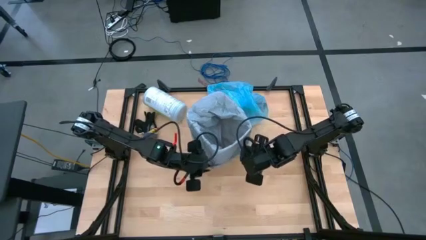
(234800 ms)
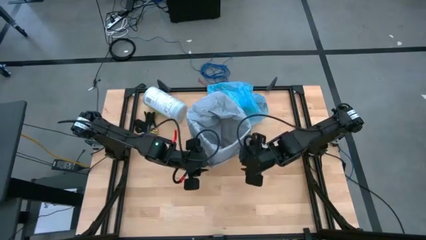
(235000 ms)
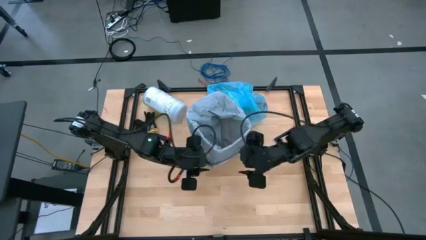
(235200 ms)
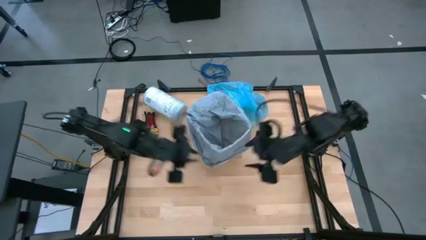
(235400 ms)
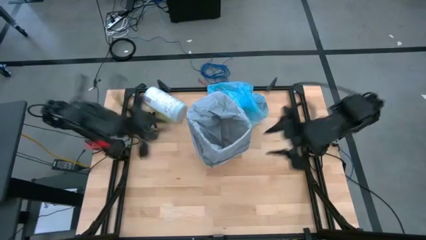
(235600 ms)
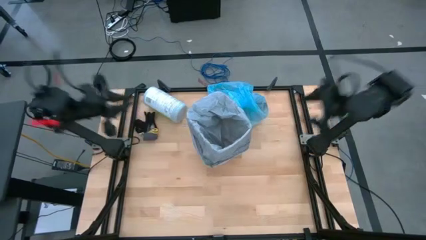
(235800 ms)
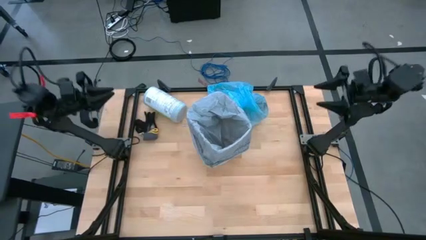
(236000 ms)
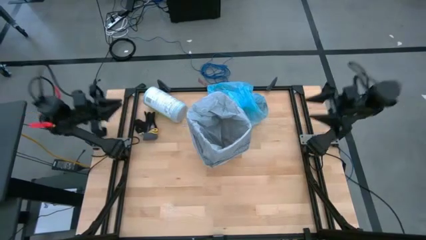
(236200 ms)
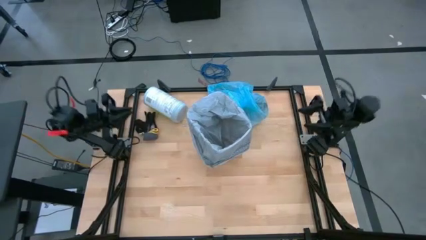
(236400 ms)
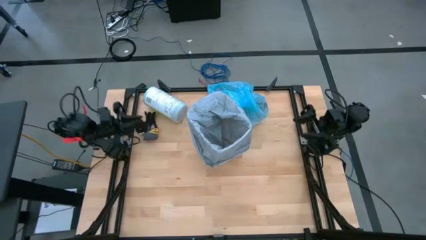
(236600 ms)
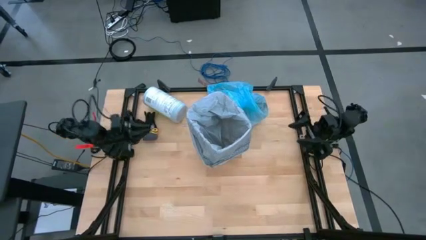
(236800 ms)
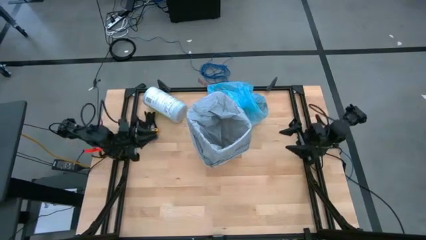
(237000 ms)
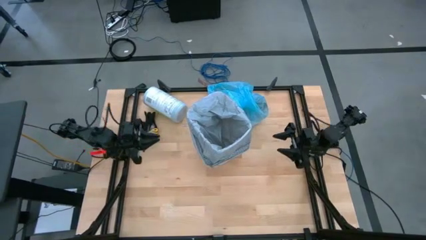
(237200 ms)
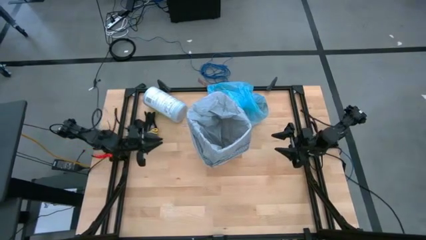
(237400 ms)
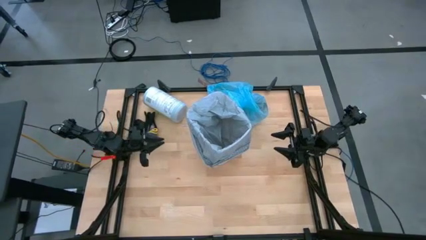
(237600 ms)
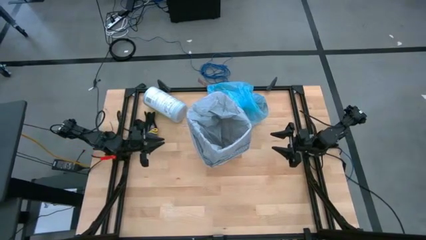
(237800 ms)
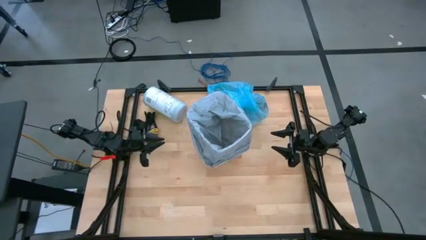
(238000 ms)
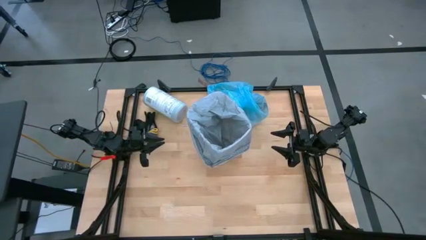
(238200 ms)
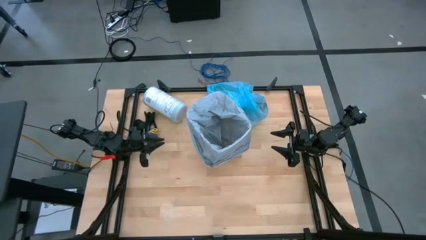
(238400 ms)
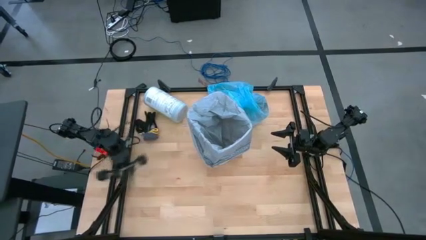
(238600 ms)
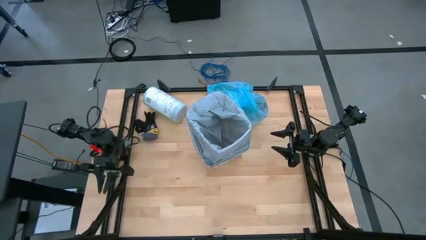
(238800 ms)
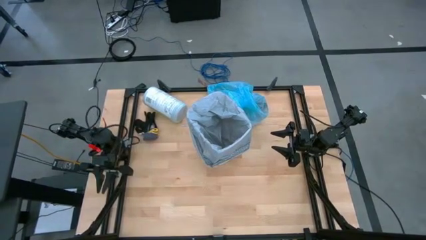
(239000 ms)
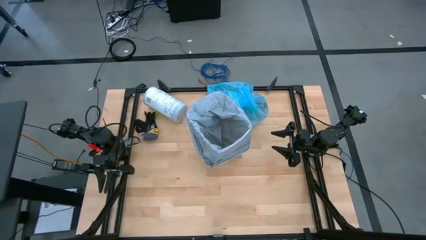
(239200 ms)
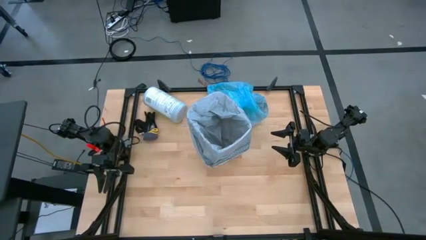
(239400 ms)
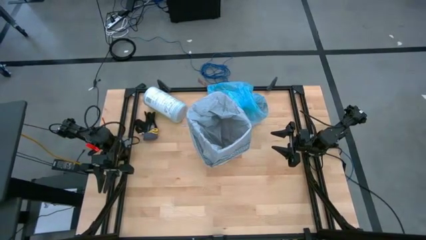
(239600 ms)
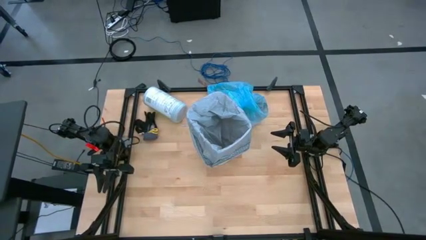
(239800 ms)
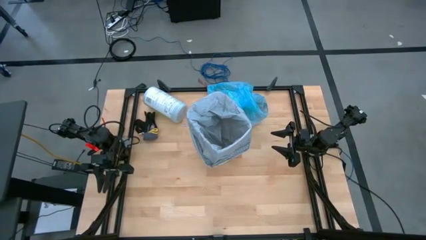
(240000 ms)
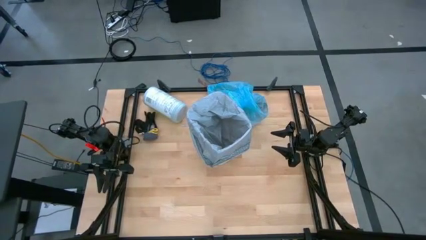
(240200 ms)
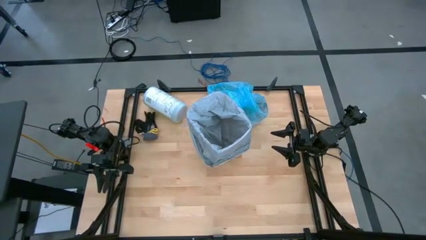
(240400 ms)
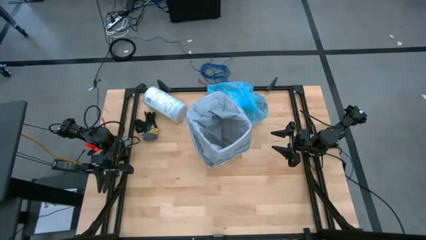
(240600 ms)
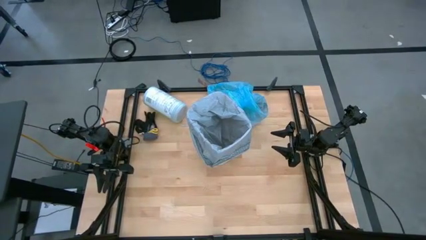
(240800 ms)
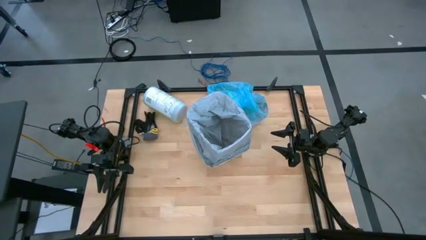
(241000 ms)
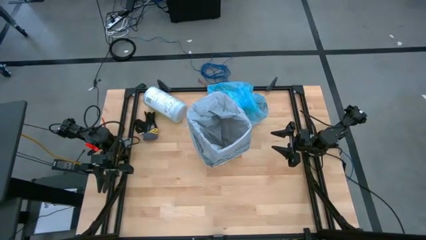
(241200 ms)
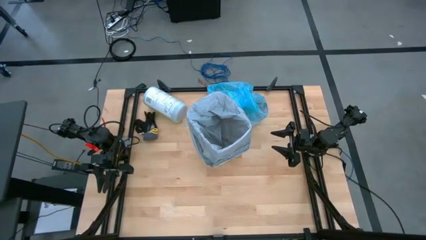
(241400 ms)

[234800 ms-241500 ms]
Task: place trash/remove bag and relplace
Return to Home Position

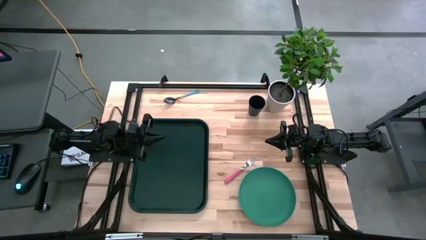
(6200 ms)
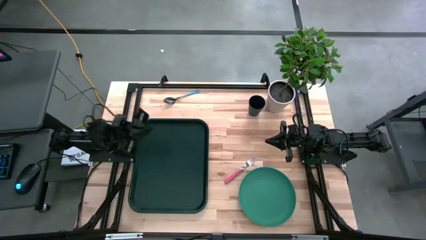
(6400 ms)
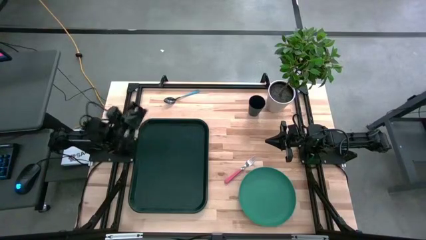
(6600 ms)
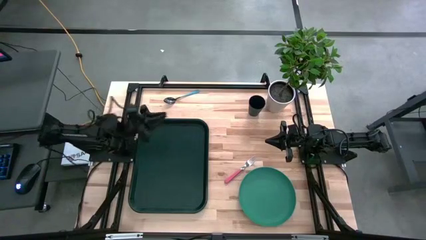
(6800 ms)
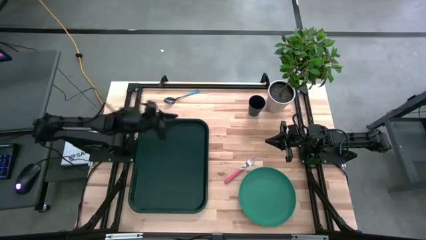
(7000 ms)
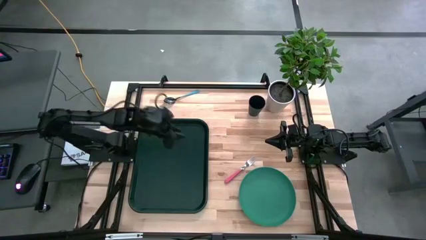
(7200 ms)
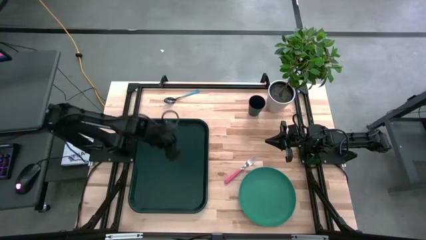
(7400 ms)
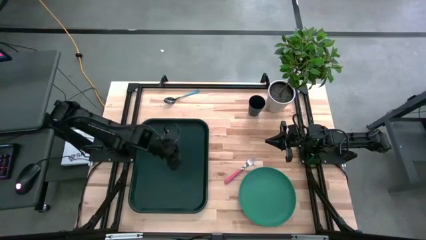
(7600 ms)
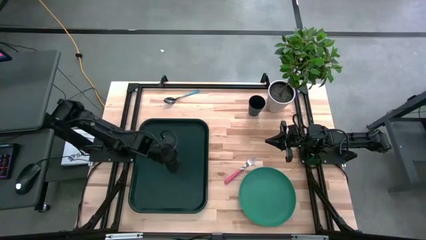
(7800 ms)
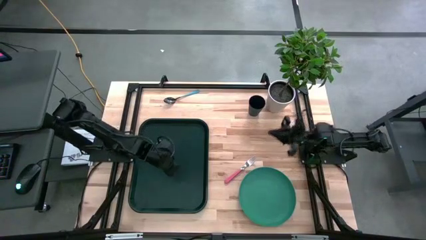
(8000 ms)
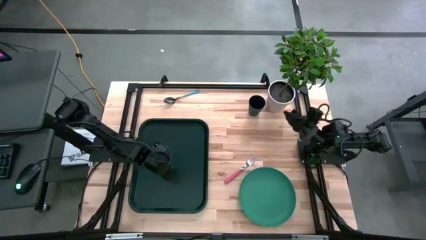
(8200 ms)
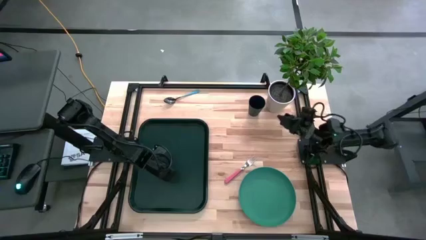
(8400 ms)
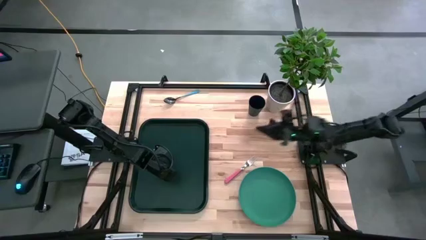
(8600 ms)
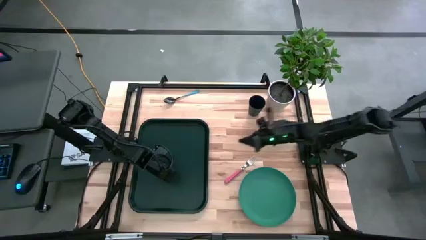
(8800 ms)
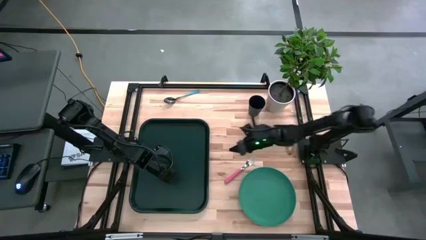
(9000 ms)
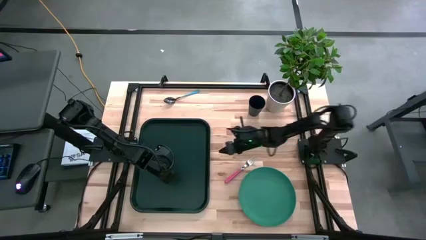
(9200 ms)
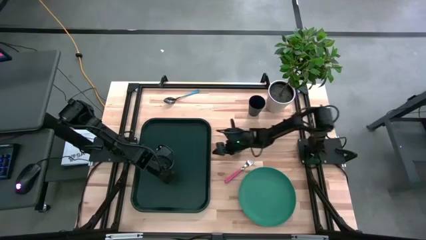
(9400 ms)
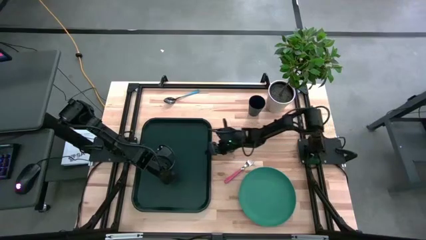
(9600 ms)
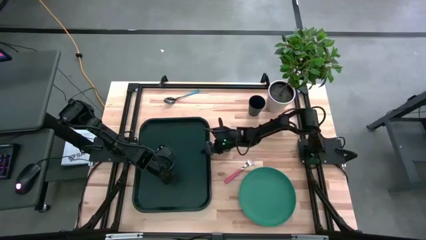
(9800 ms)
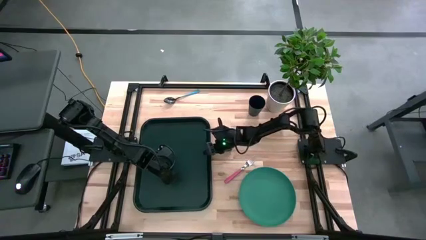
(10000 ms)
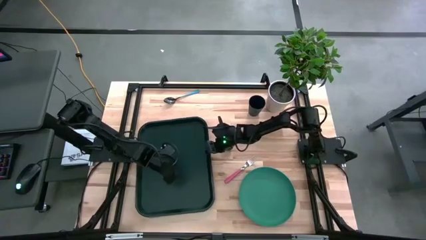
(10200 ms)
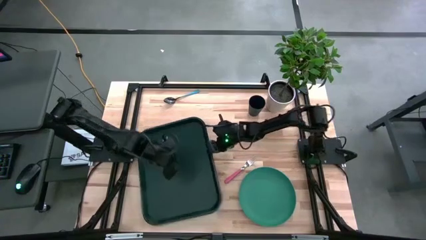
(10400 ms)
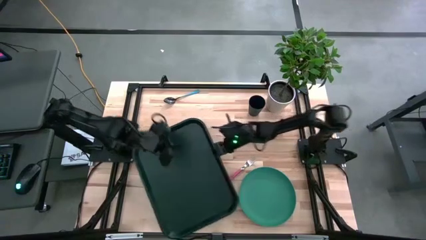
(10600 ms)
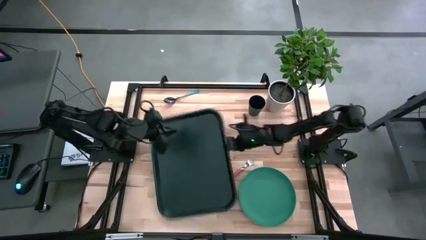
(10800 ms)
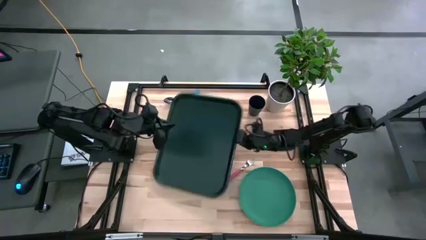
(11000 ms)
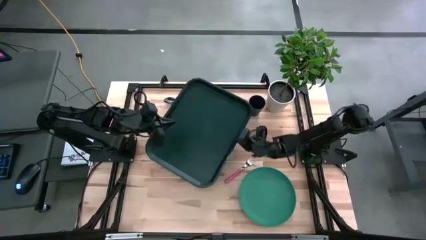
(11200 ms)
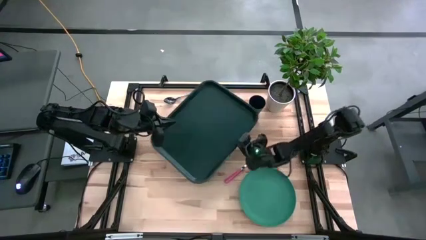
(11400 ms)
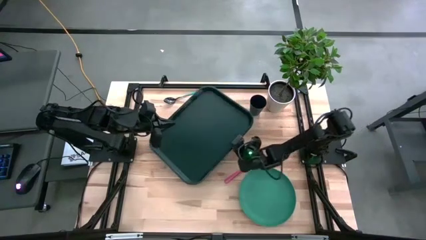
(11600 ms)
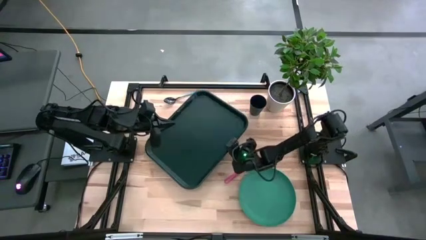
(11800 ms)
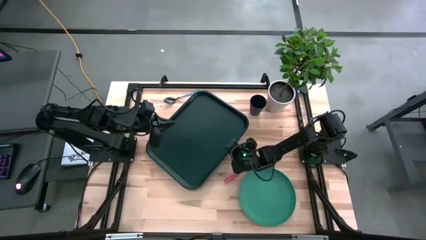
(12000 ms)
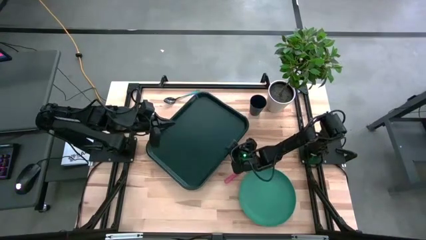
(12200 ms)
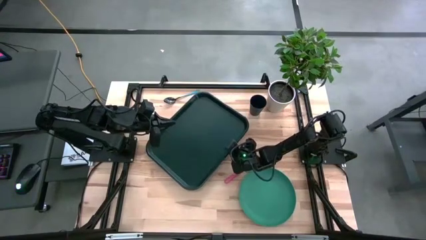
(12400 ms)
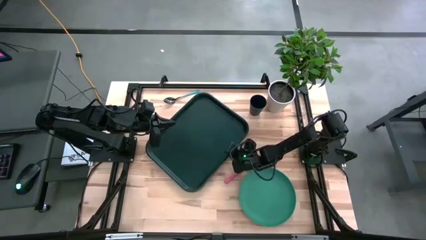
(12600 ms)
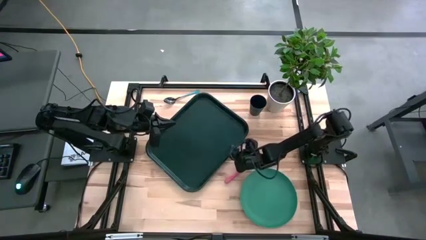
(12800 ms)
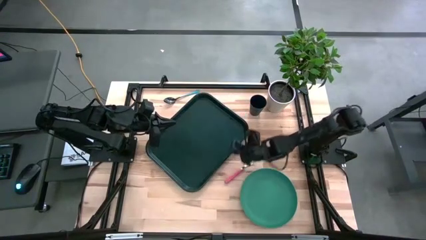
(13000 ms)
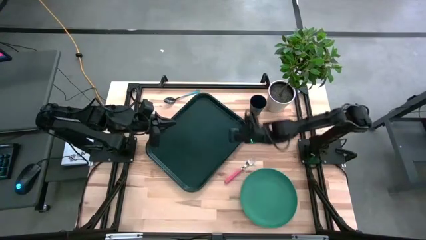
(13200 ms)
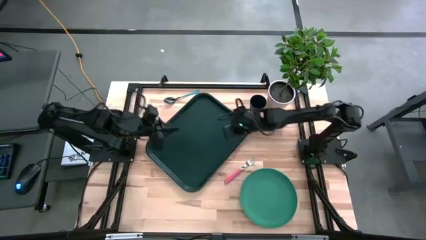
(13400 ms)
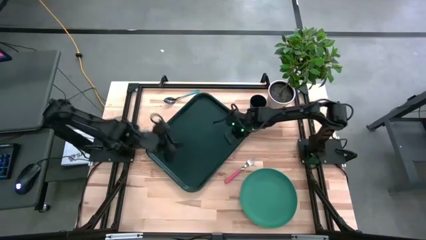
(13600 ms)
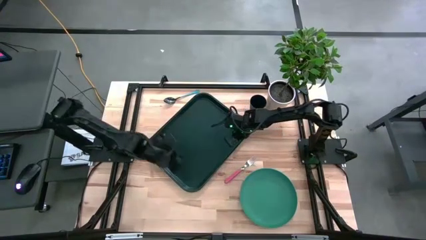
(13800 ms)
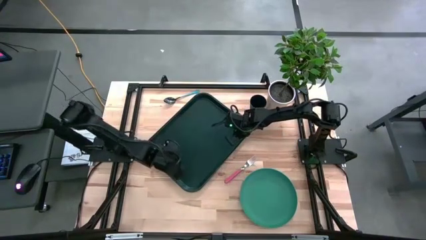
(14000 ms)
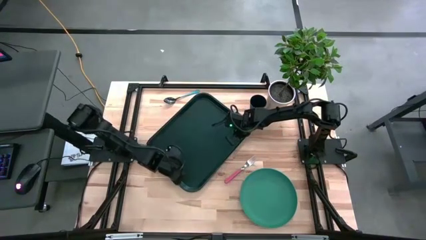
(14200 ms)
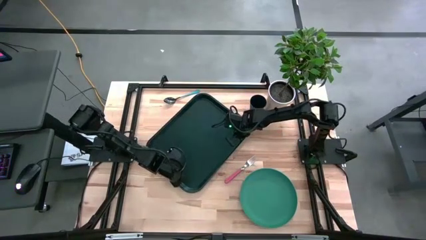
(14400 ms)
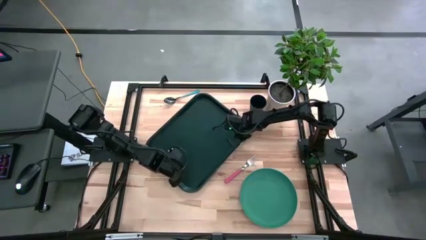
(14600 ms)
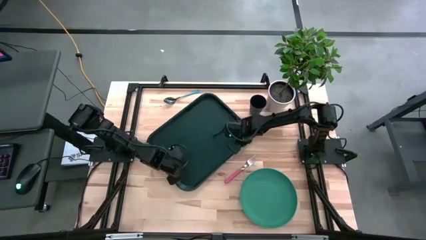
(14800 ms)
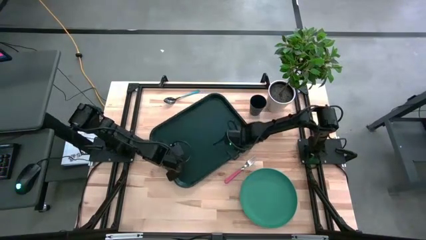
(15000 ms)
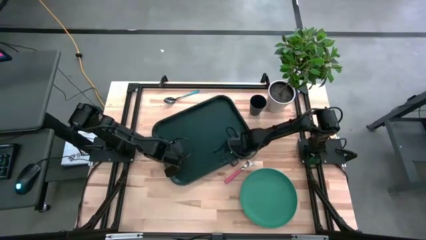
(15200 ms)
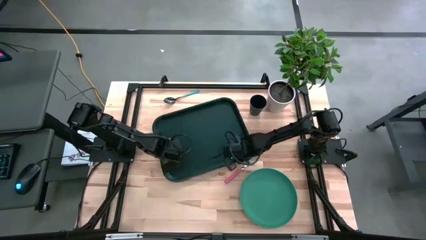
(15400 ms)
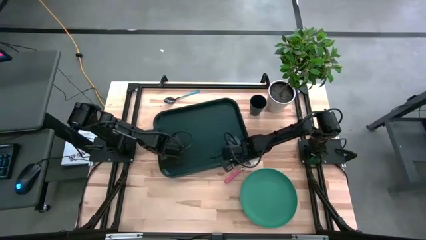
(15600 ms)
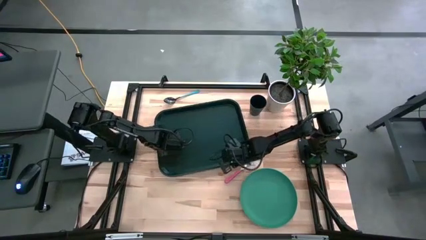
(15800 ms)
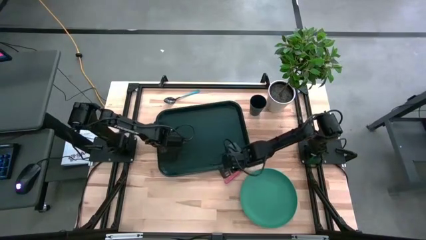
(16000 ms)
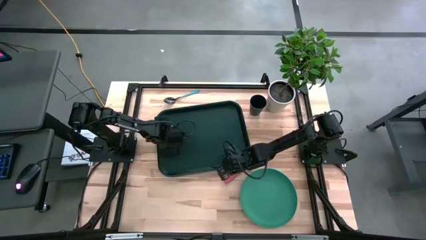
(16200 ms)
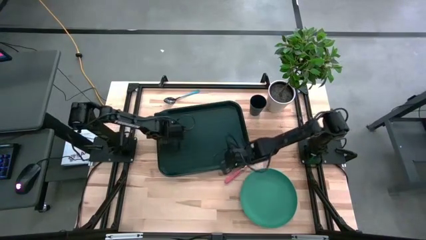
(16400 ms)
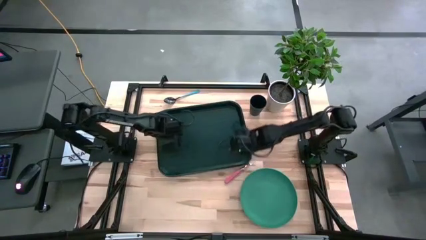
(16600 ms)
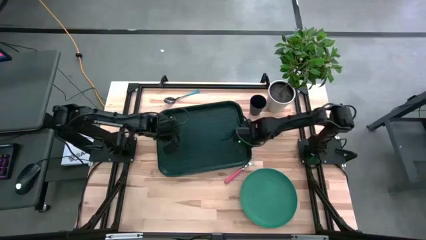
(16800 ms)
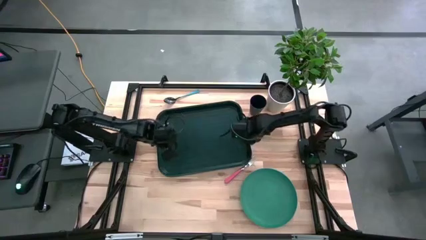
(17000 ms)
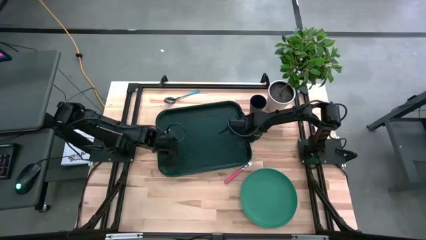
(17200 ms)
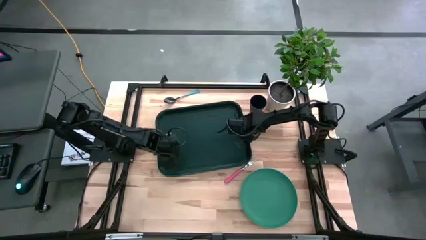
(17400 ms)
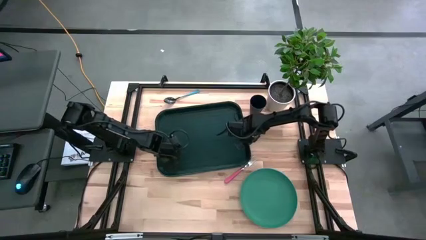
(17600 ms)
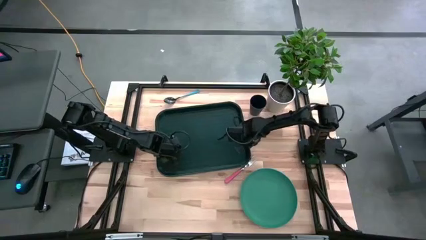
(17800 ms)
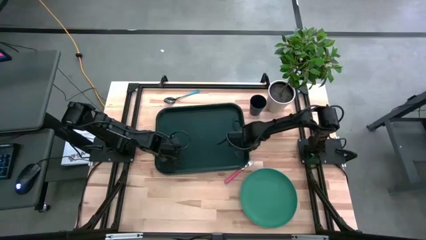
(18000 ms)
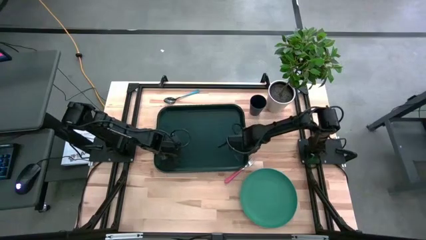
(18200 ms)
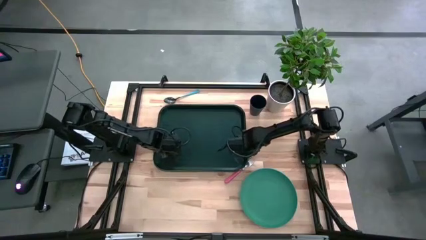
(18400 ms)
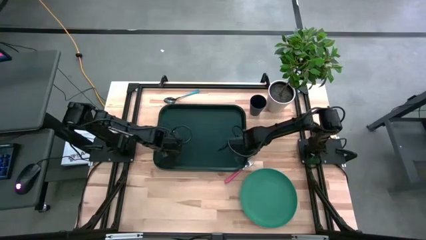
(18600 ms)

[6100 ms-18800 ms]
Task: Pick and place plate/cup/fork/spoon on tray
Move the black serving tray to the center of the table
